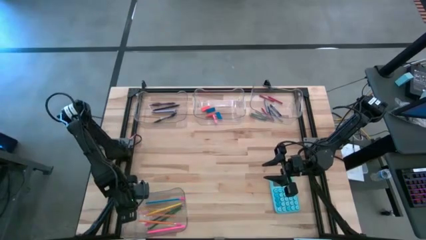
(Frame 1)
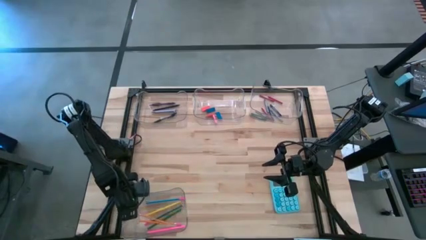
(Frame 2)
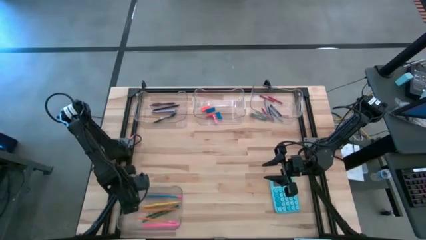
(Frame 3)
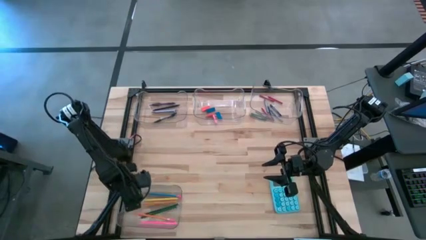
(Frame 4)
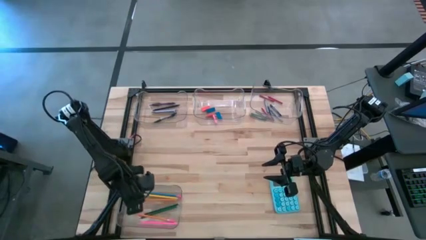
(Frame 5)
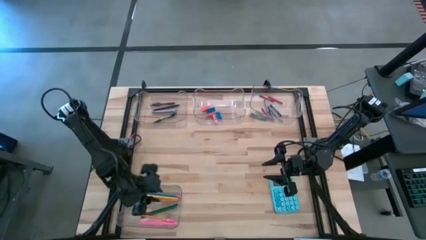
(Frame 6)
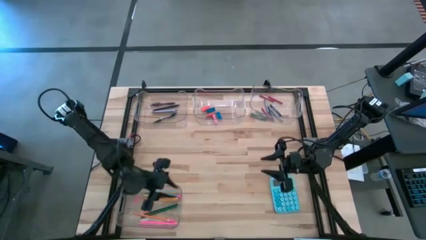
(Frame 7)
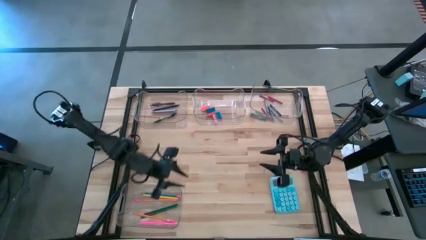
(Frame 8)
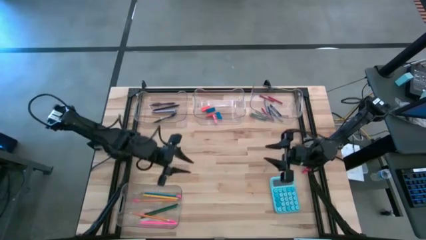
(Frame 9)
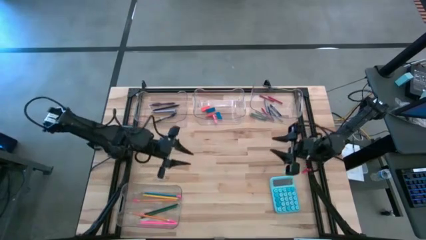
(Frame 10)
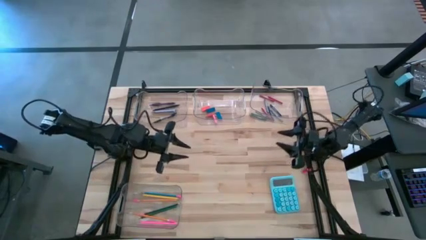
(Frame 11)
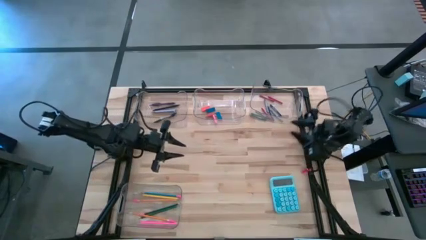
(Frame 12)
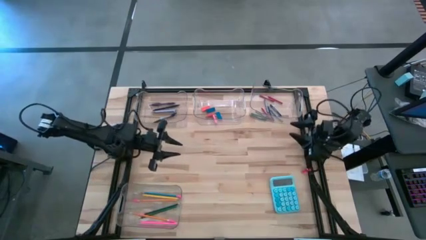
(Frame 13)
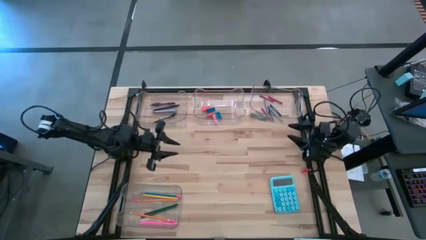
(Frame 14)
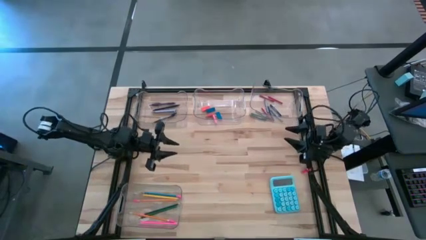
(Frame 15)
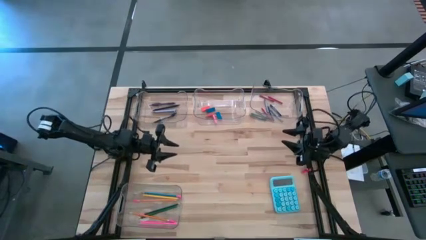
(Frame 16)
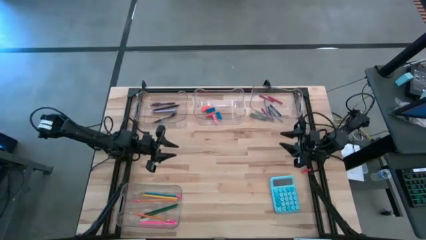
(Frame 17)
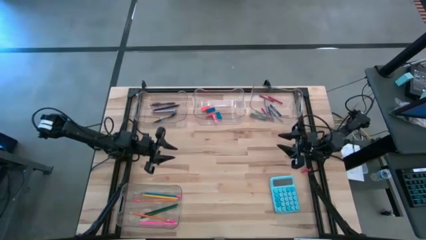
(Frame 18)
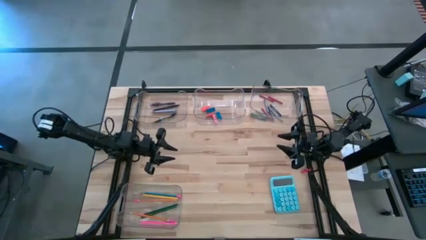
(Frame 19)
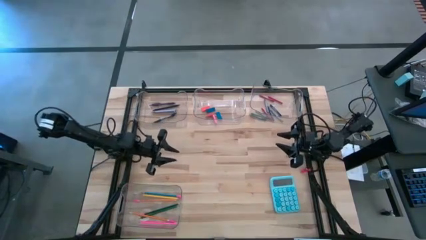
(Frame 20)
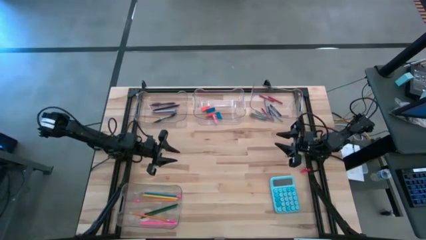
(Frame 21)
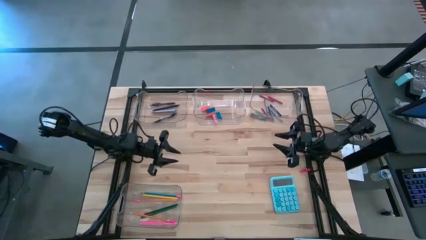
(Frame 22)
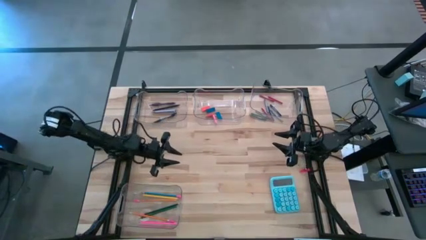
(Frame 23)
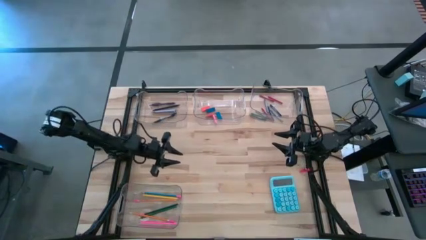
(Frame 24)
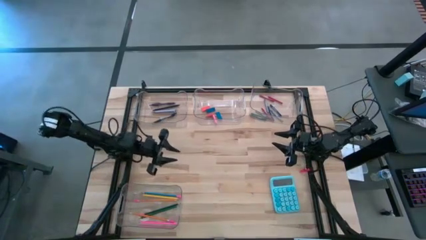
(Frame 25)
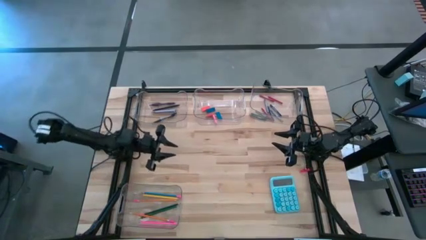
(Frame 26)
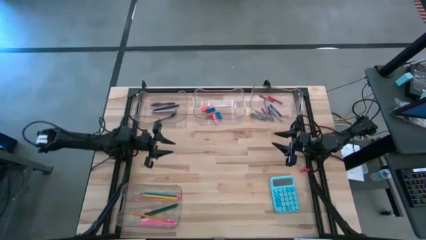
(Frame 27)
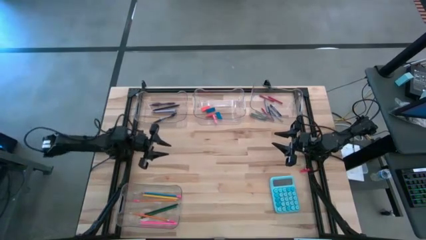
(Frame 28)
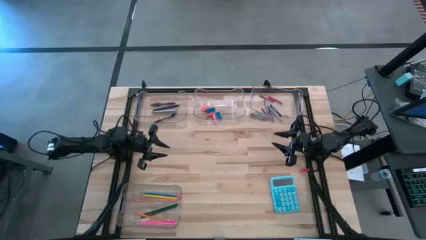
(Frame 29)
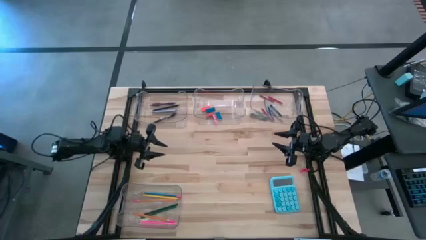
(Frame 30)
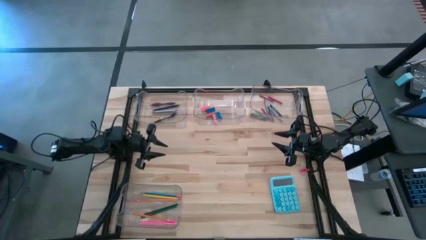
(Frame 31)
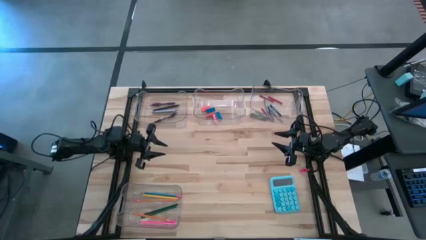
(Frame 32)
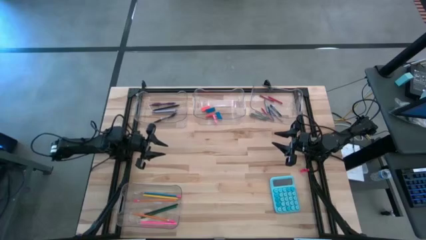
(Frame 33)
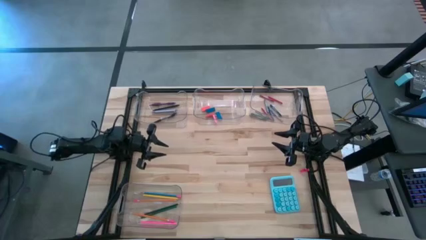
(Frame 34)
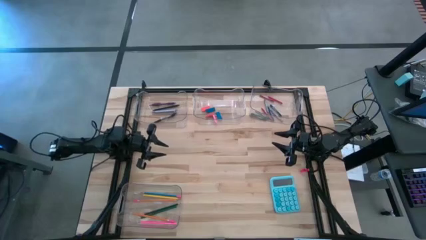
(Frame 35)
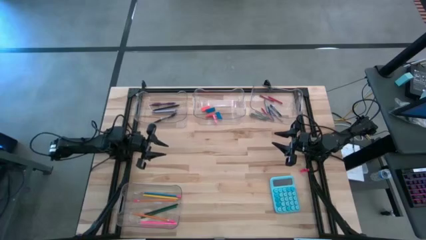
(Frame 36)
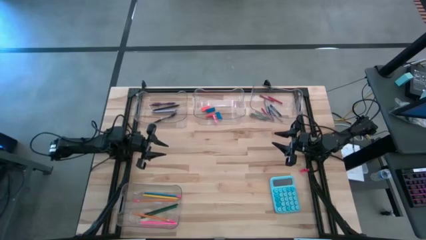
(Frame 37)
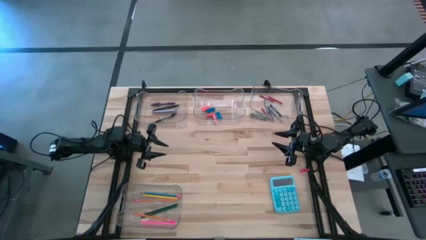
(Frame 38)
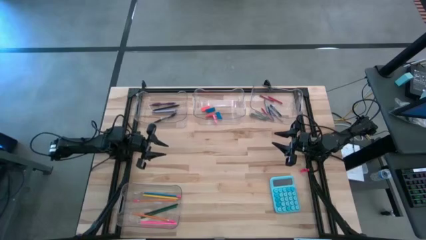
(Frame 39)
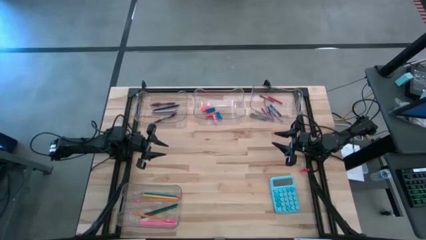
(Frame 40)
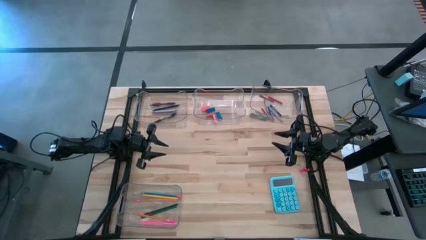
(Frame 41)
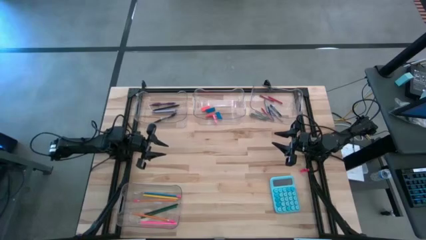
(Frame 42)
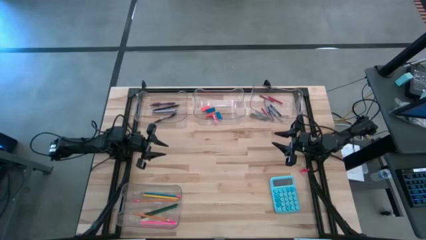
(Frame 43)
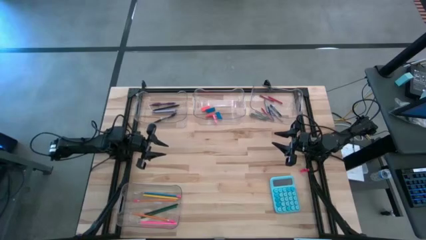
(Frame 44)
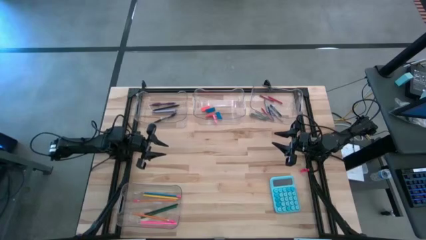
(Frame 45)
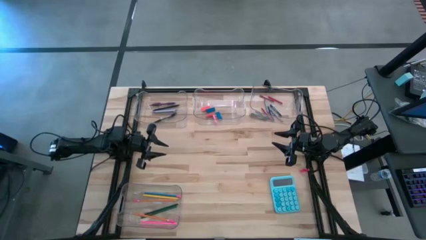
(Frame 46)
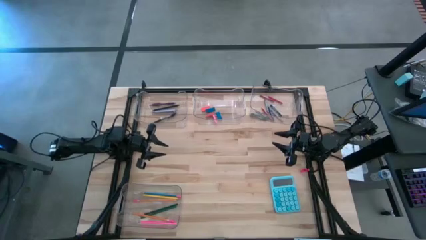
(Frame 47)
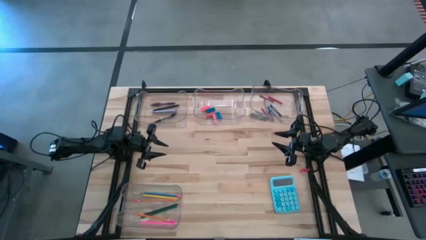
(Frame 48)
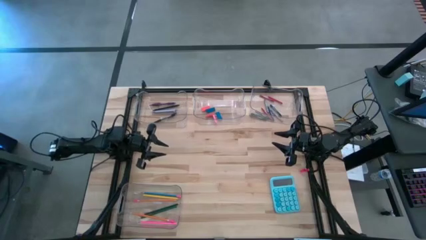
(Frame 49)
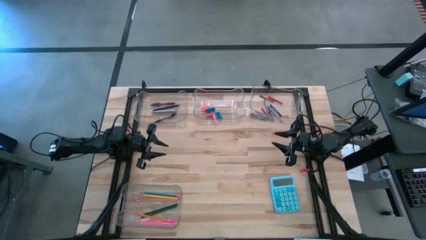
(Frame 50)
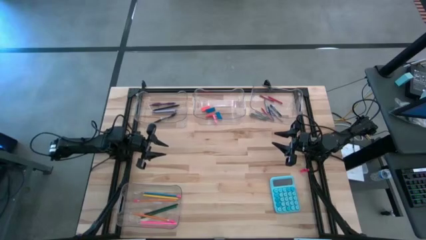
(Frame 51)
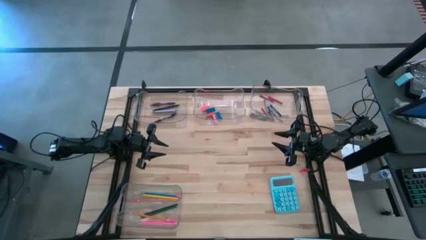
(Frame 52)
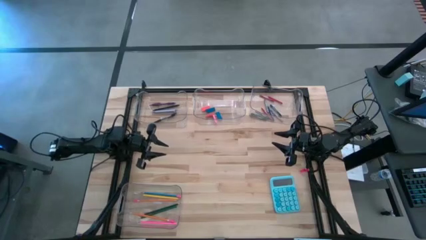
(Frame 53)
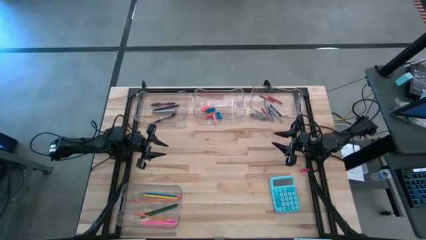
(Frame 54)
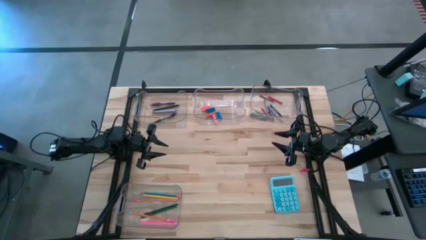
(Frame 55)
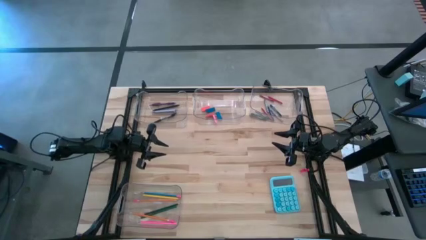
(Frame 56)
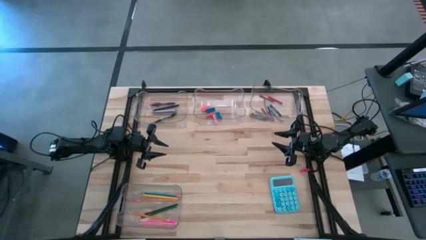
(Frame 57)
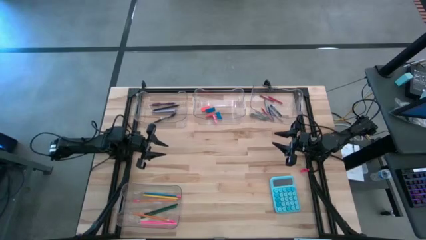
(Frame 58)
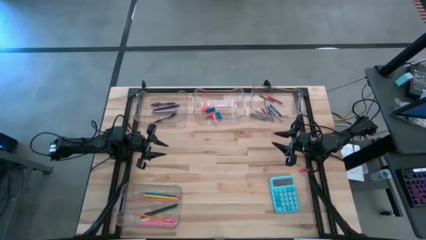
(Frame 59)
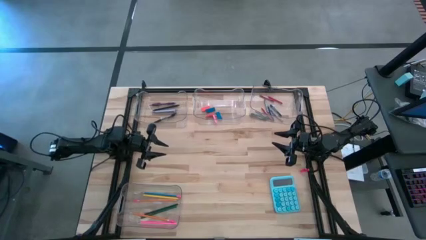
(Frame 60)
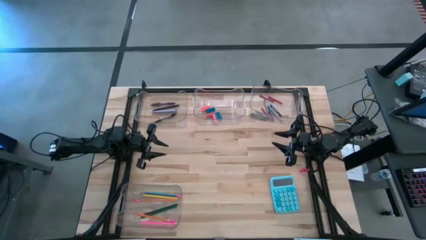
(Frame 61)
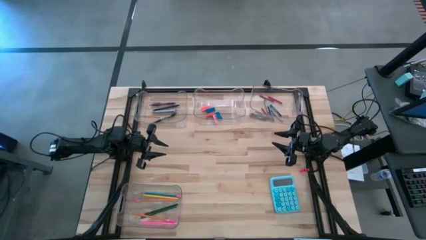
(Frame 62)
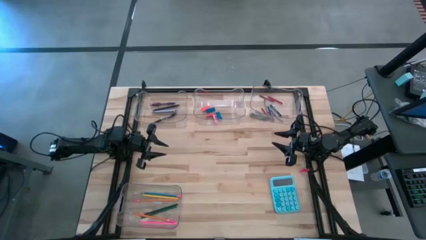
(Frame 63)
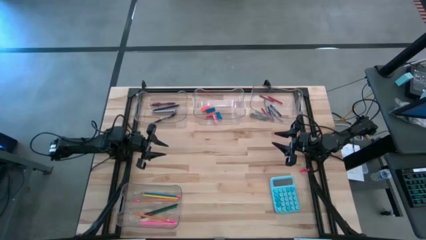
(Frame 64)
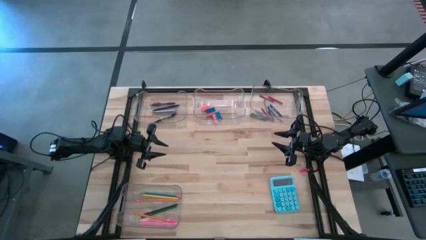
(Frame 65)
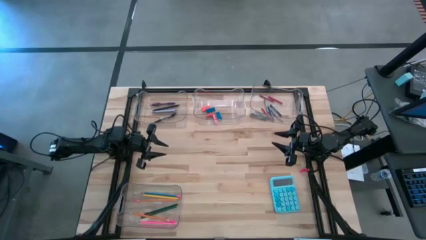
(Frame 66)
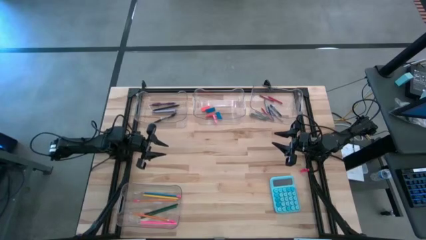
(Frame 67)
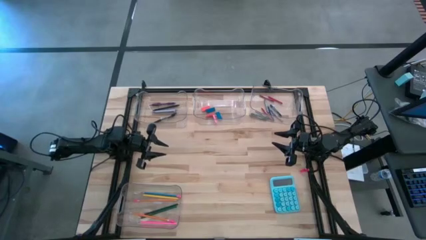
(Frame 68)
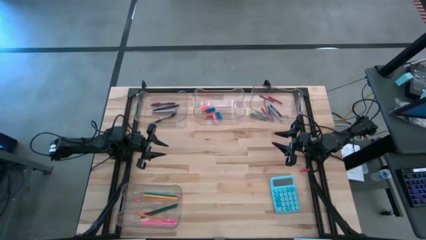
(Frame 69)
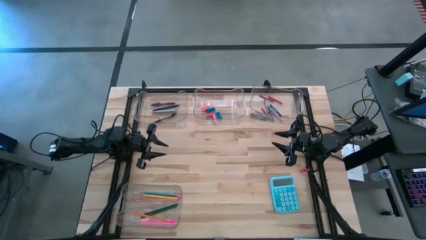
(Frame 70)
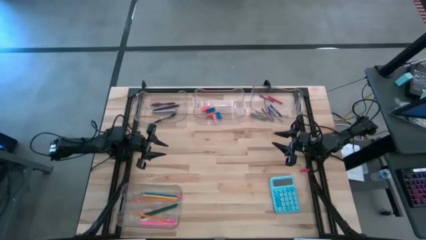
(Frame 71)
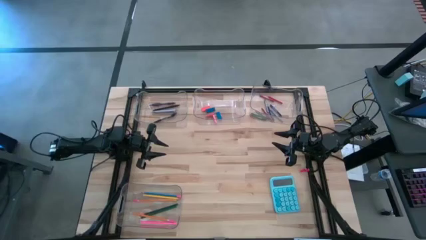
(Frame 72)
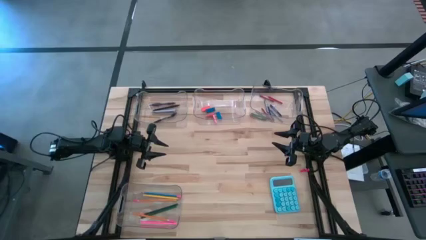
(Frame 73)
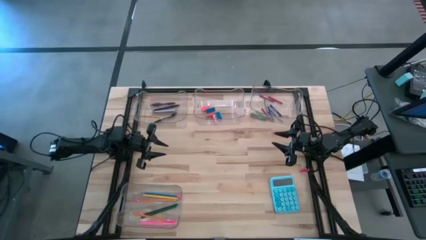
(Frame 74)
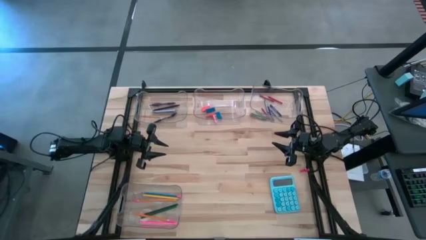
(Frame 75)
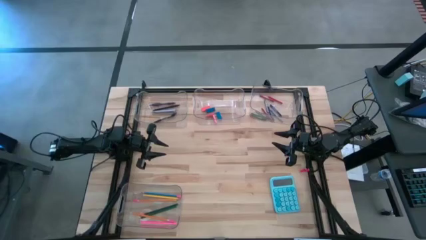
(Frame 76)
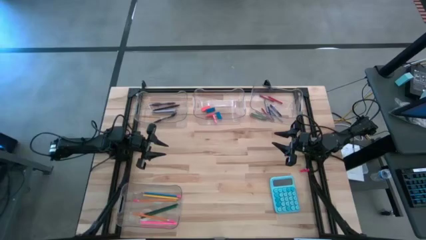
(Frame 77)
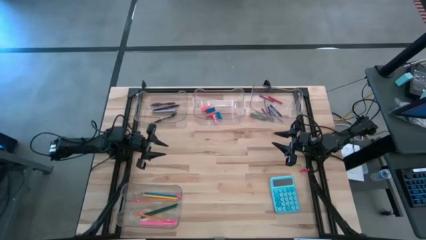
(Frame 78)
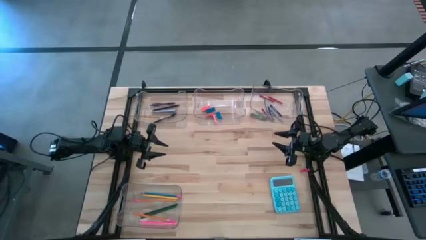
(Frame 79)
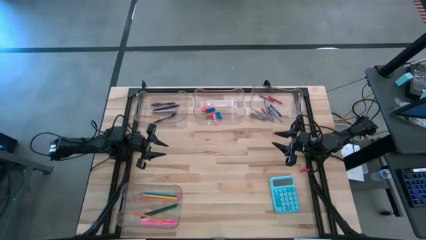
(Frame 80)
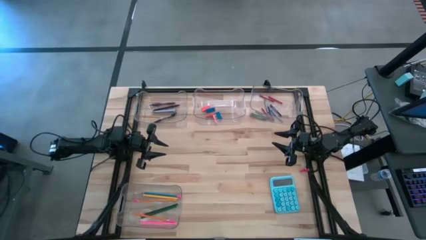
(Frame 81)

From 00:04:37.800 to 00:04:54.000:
Task: Sort crayons/erasers/pens/pencils in bins
Return to Home Position
